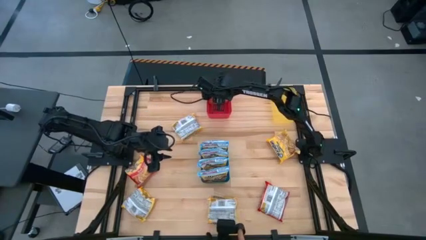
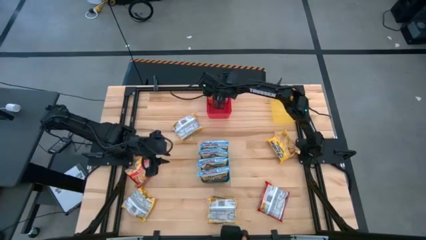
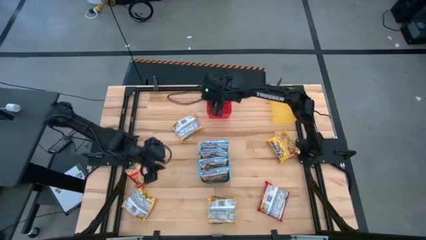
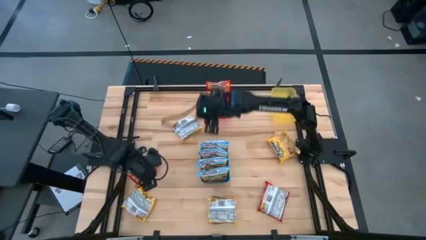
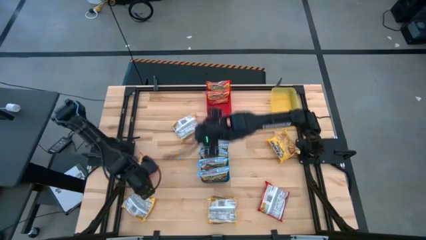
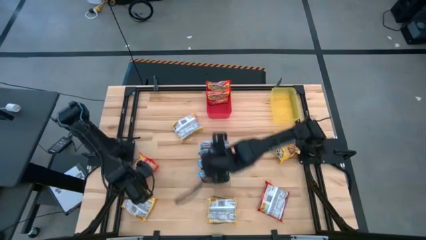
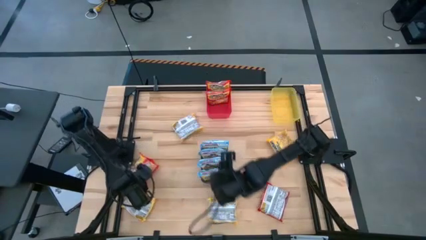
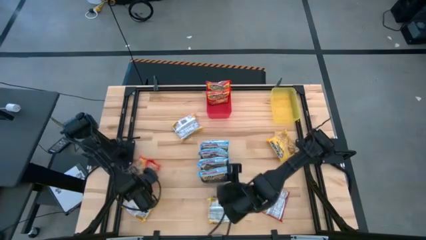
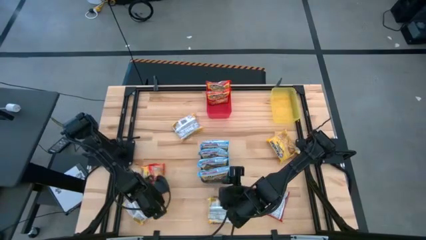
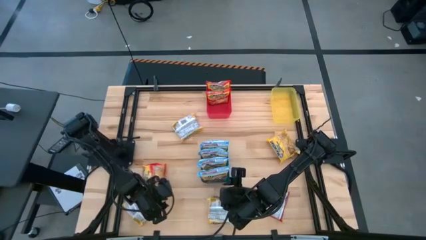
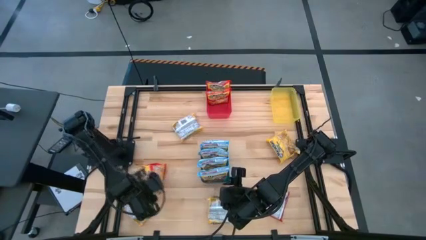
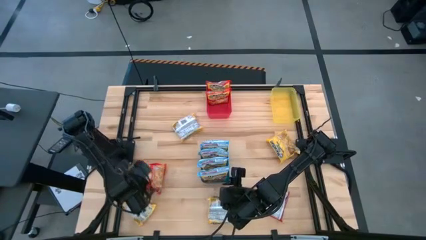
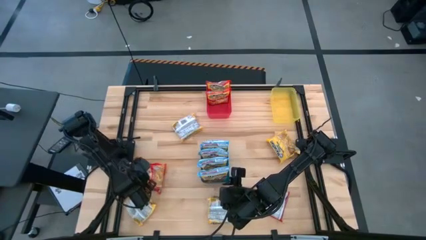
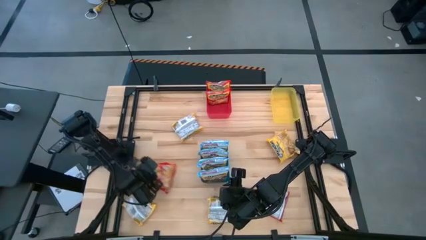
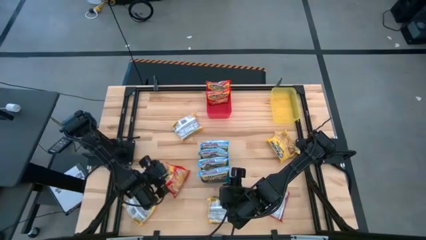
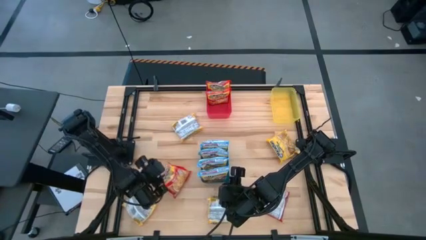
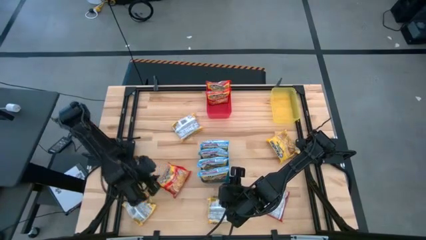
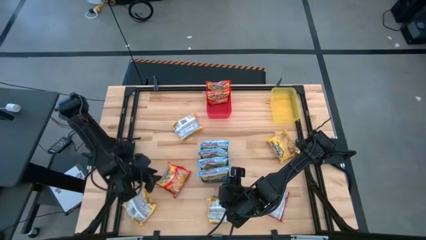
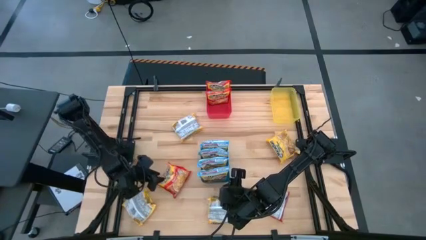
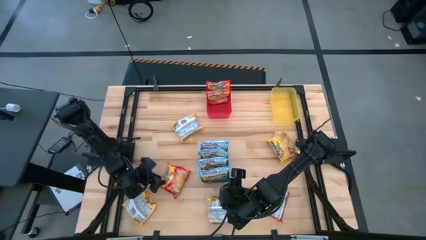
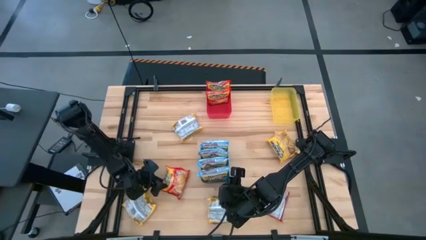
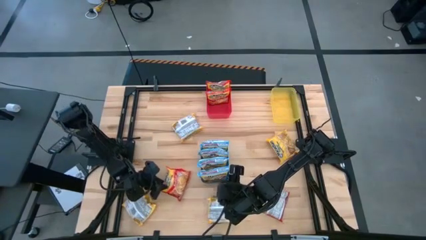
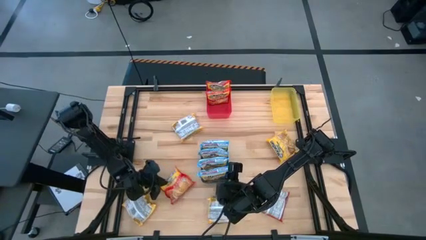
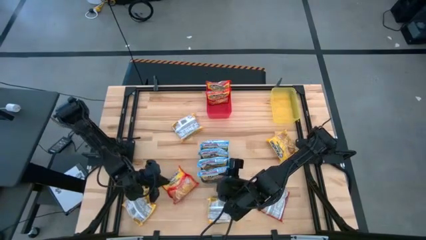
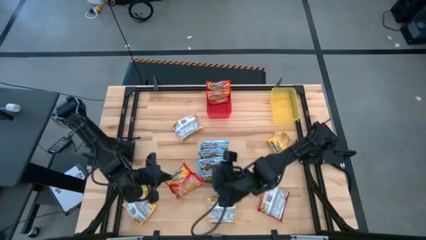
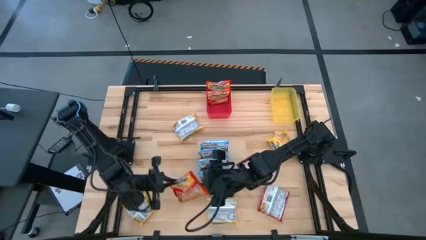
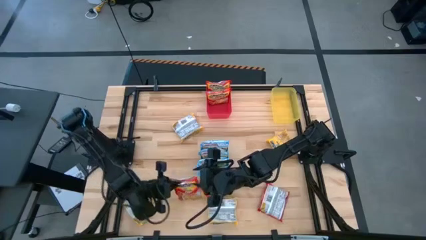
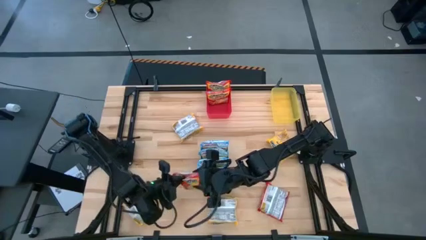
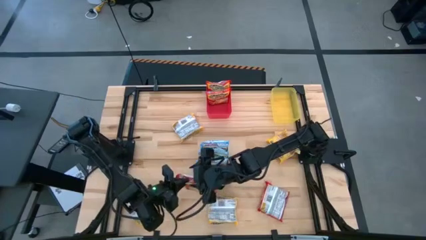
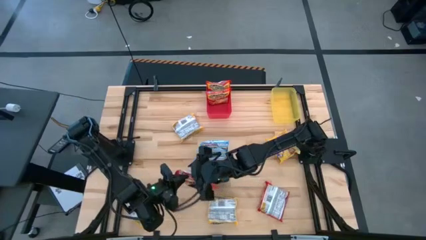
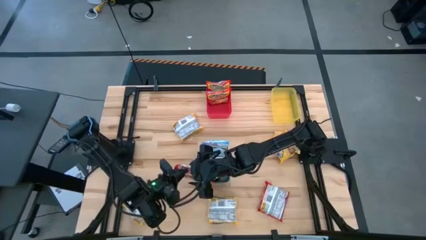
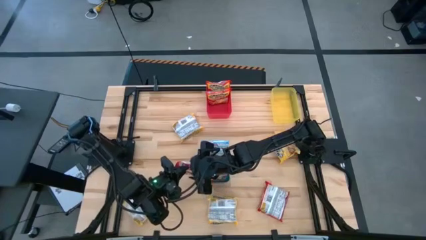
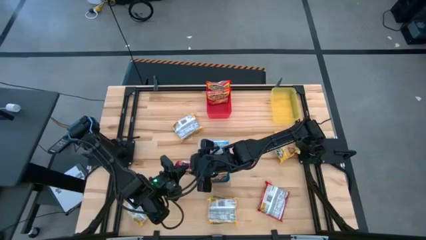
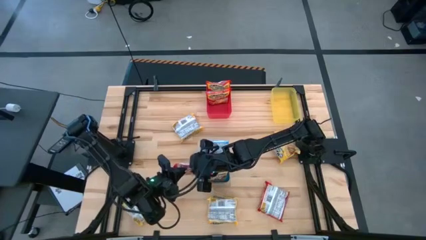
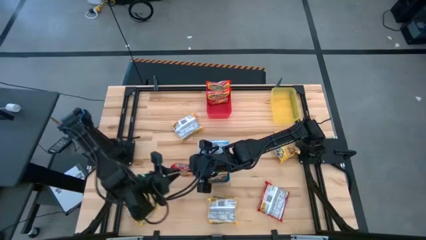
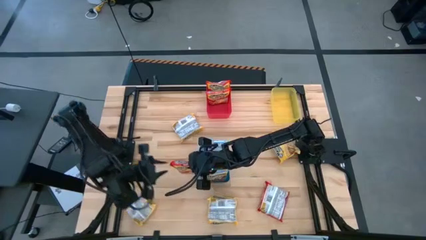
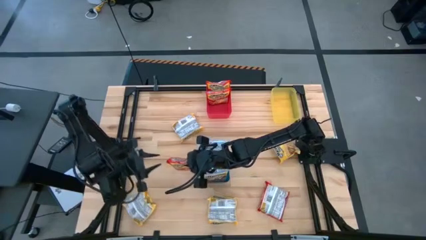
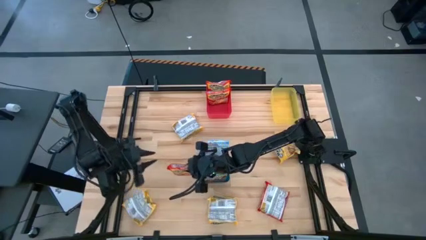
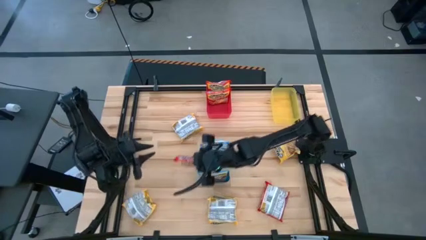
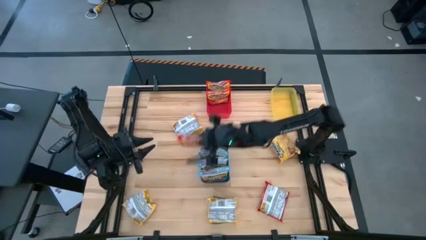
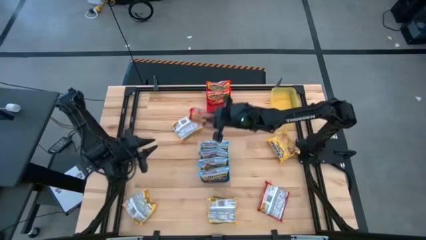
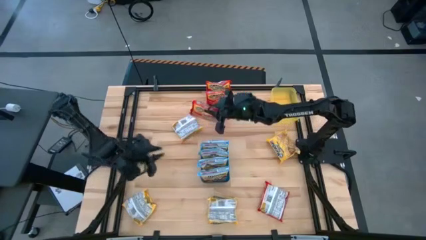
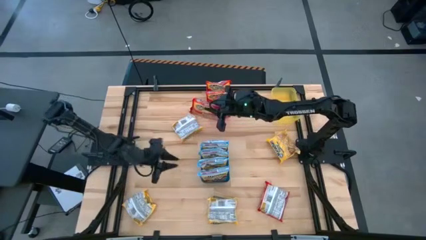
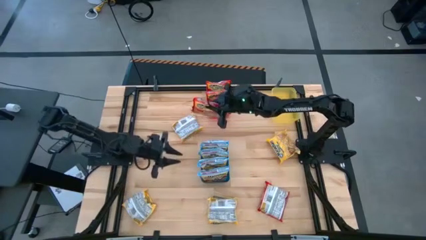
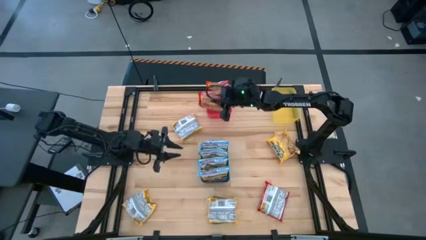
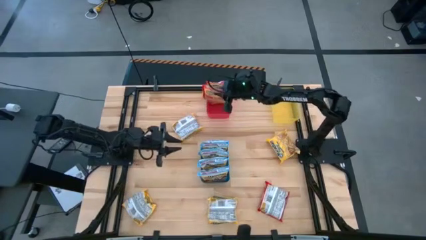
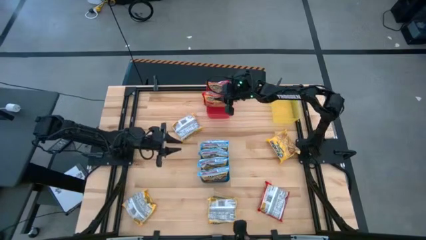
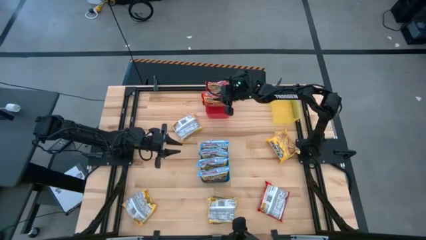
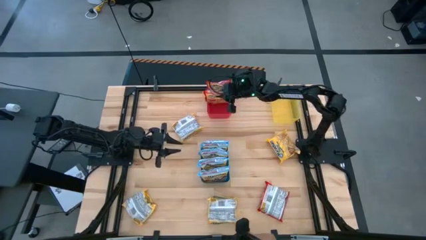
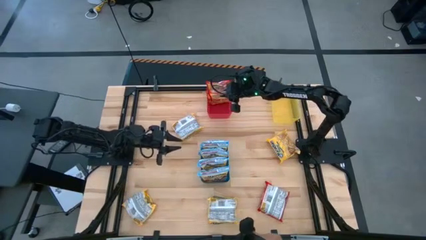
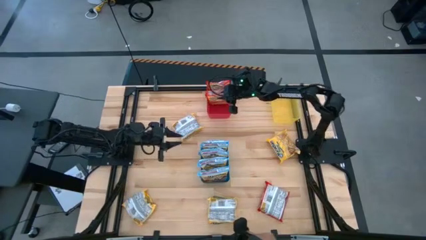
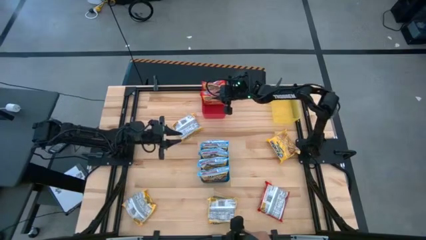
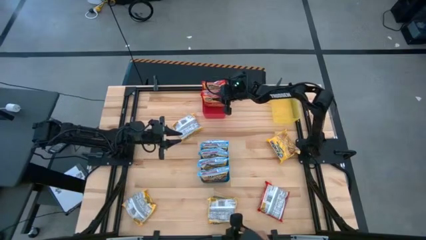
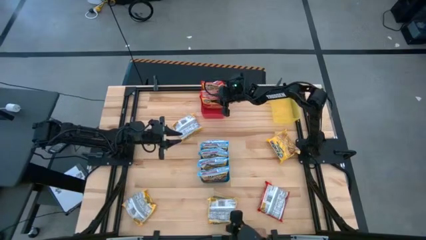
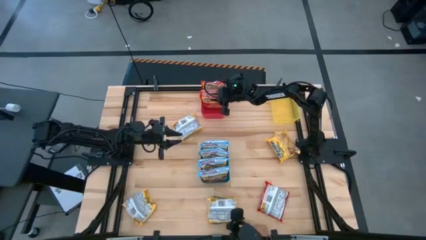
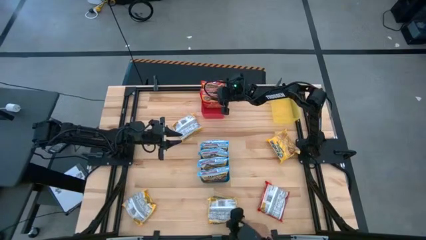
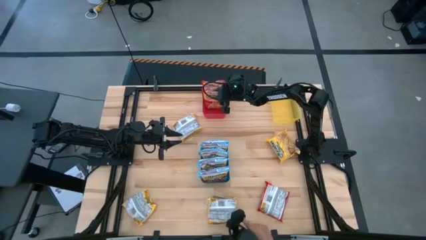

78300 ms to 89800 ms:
Task: Sort Maruchan noodles
Put the red noodle pack into the red bin

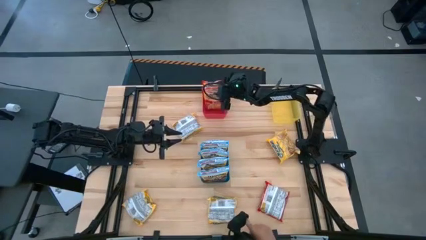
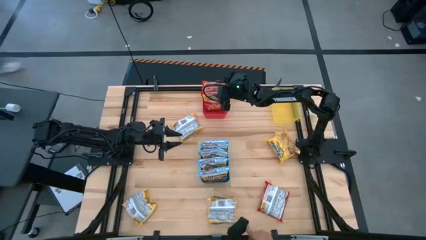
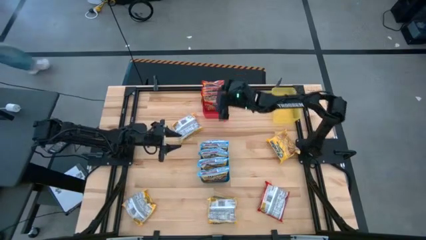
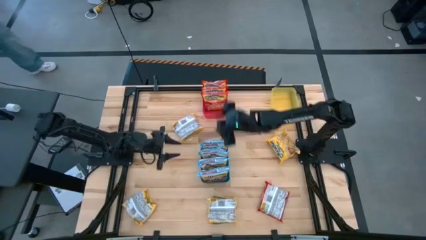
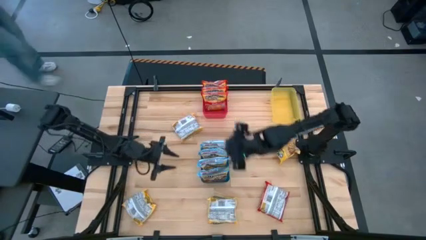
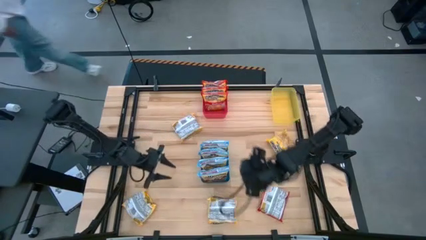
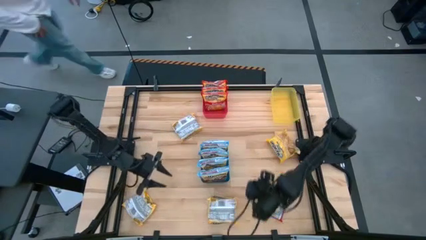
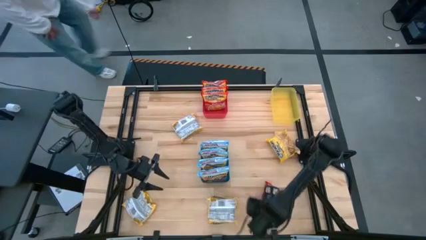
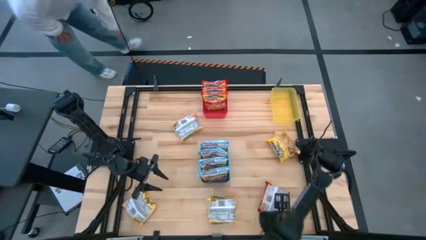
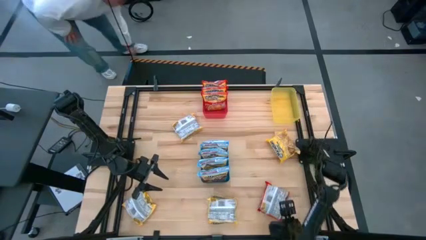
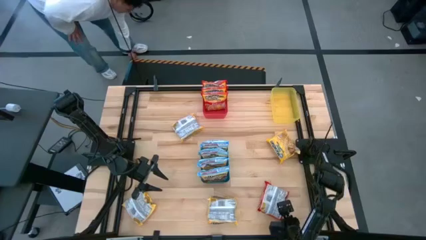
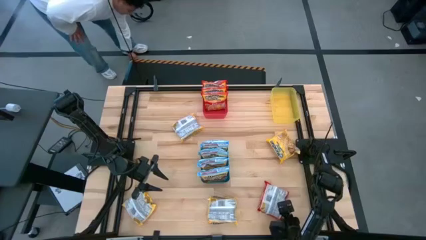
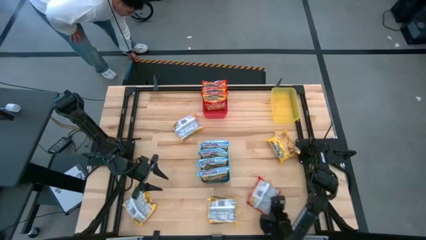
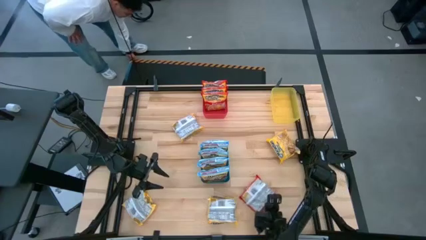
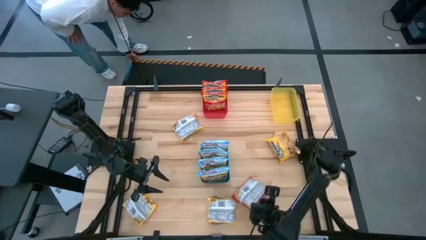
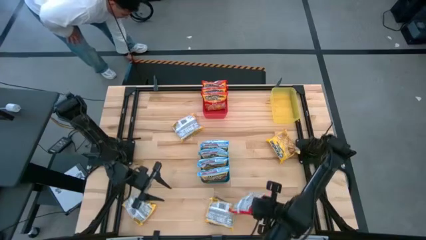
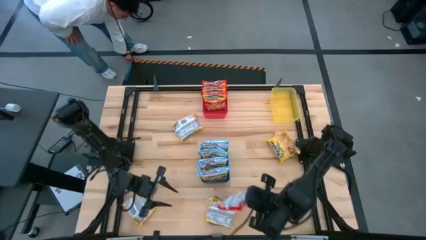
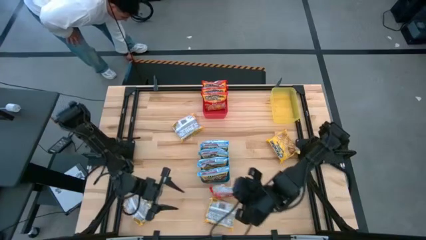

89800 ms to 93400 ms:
Put the red noodle pack into the red bin
